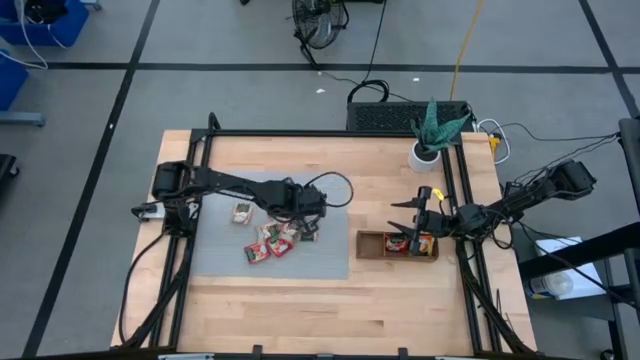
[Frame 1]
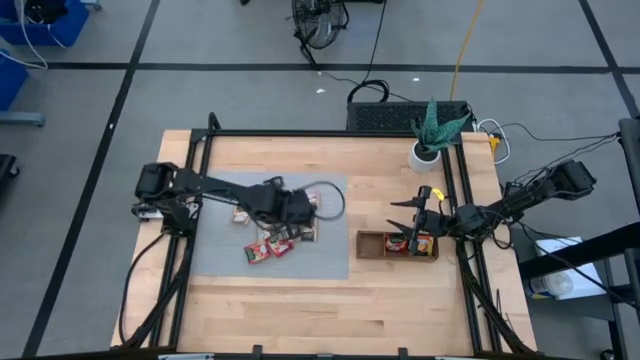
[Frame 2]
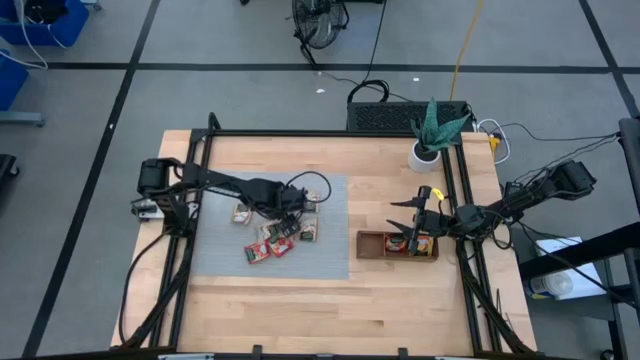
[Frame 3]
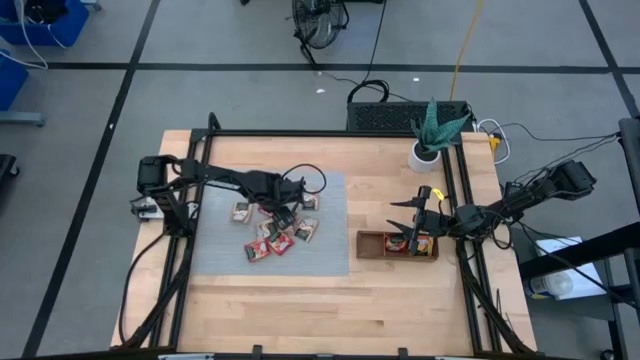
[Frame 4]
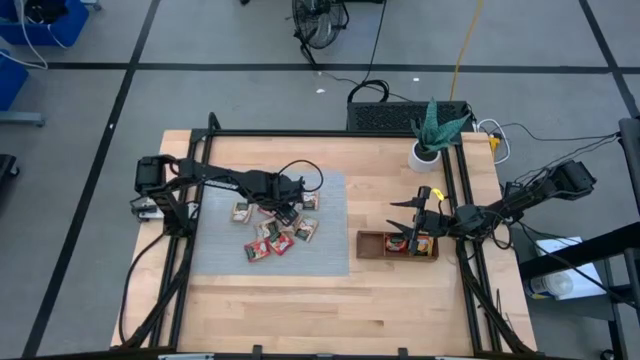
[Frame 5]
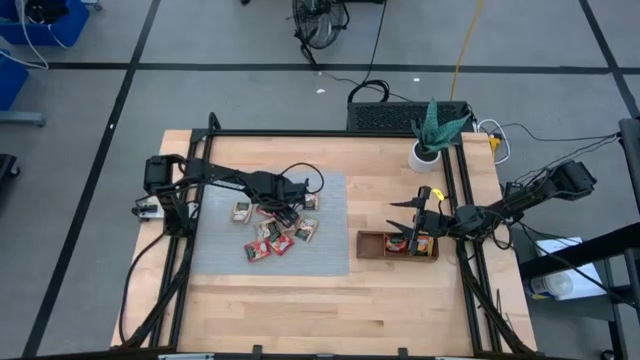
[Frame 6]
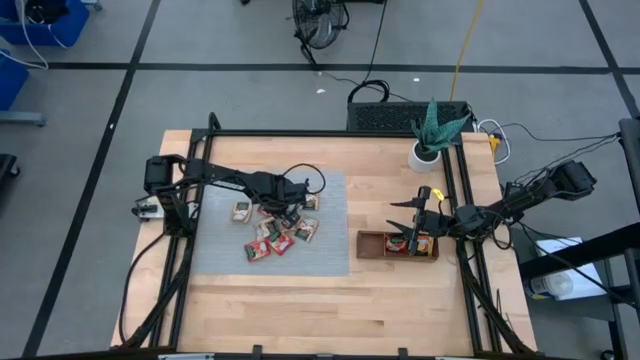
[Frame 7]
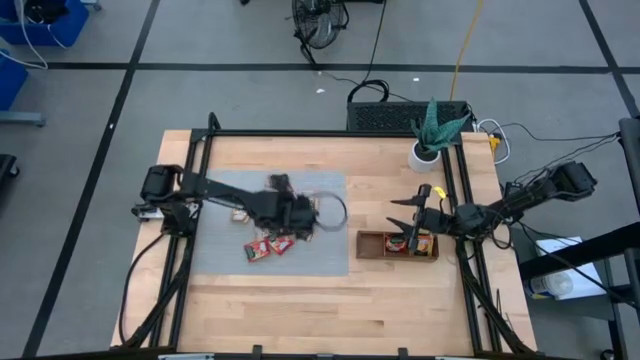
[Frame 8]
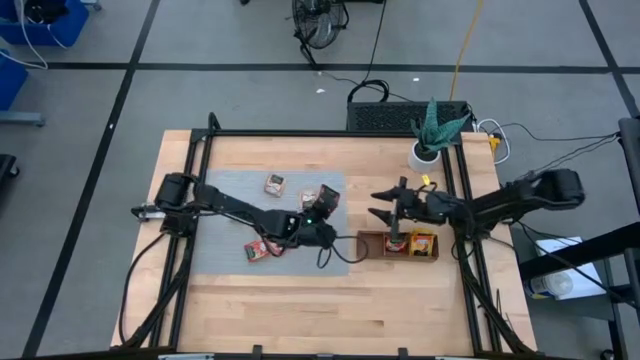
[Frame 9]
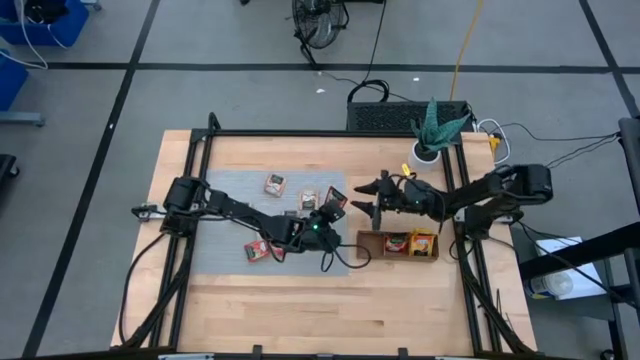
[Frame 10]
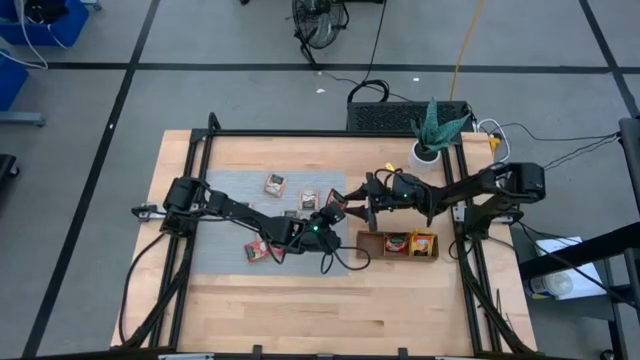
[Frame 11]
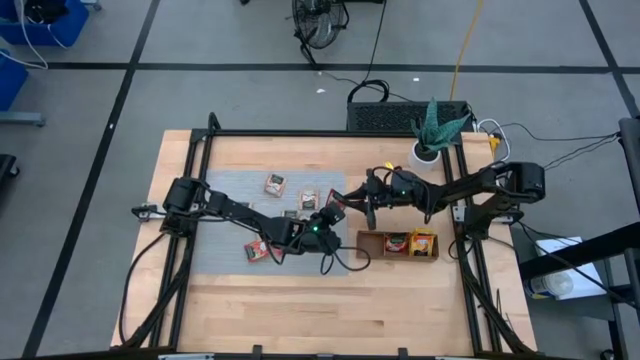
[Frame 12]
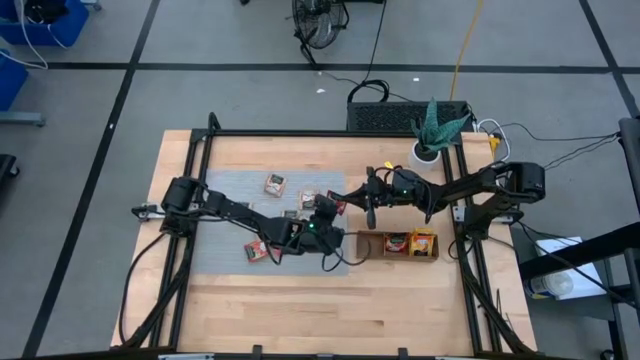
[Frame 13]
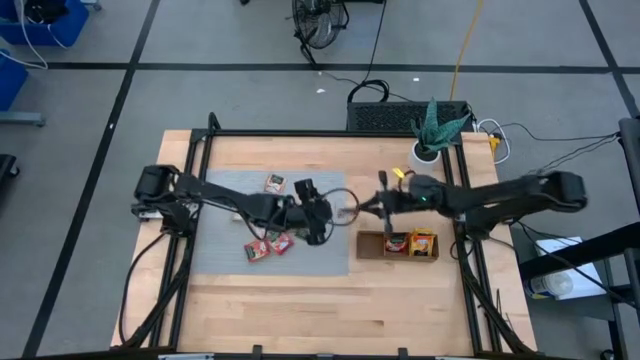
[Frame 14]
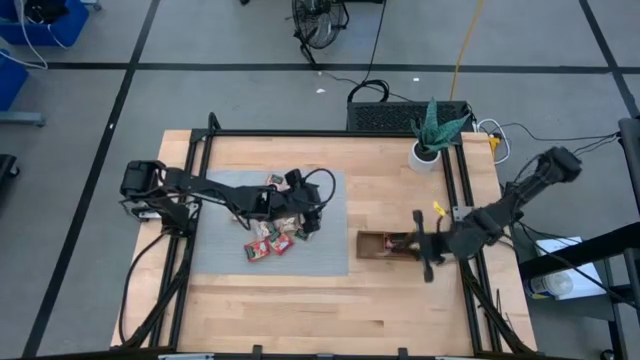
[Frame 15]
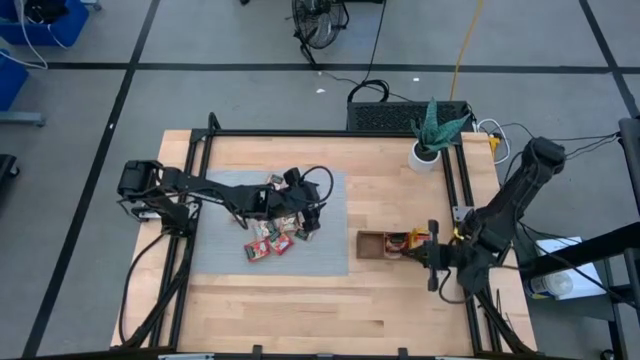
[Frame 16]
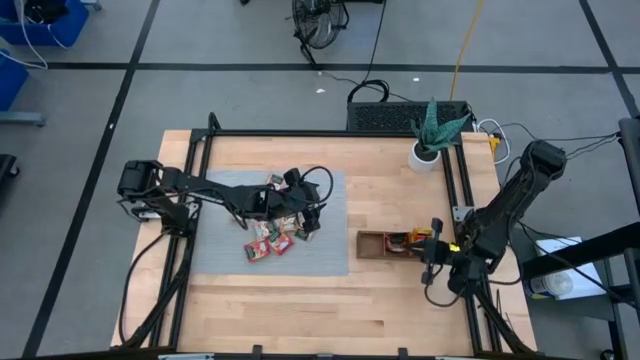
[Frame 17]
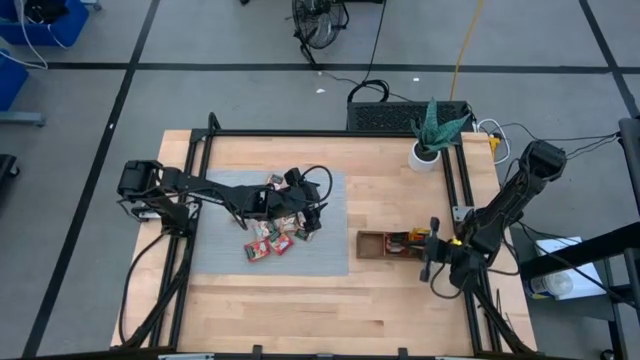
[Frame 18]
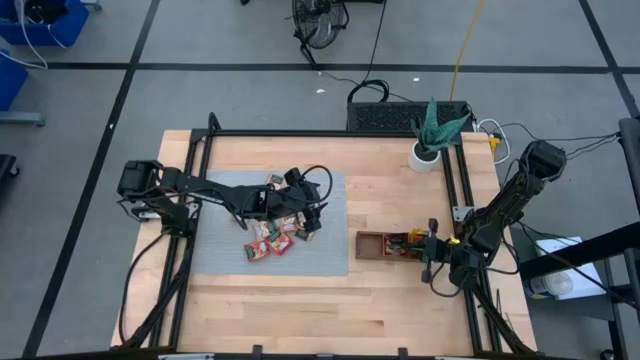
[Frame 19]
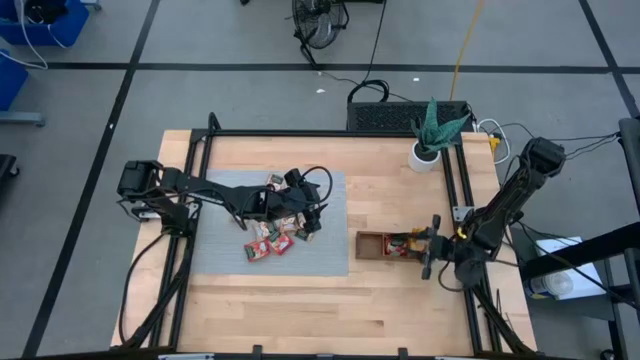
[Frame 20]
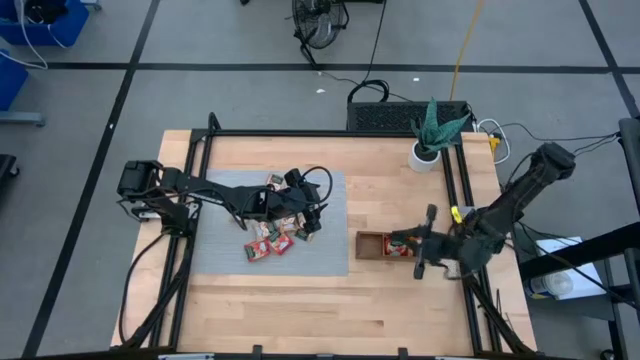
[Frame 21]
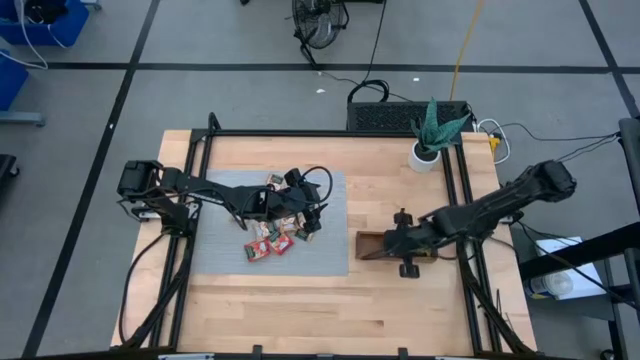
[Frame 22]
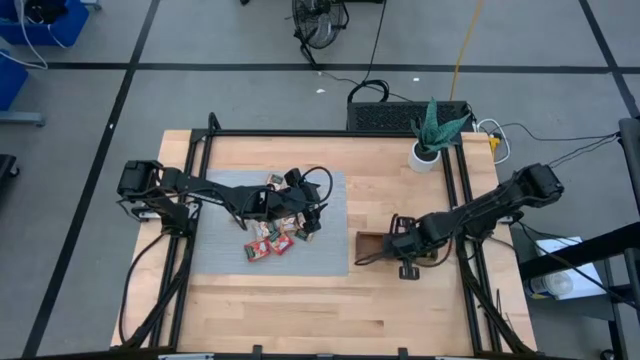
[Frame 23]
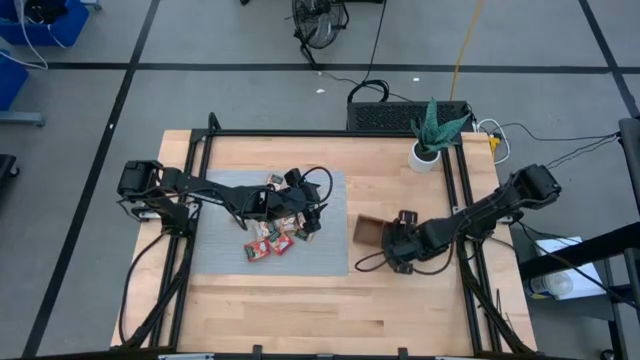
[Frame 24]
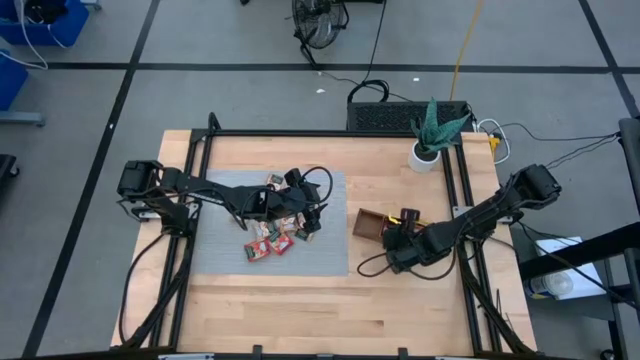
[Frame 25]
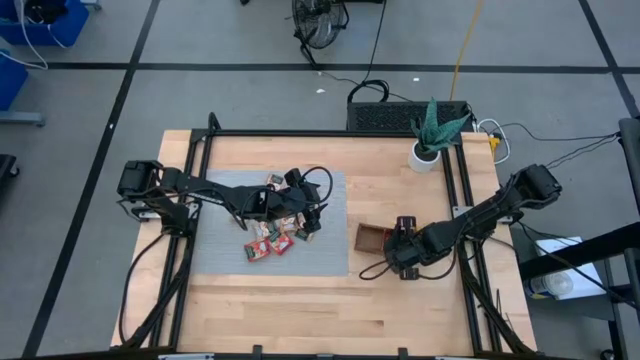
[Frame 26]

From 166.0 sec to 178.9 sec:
Task: Pick & Place Tea
Put the red tea bag into the middle section of the wooden organizer

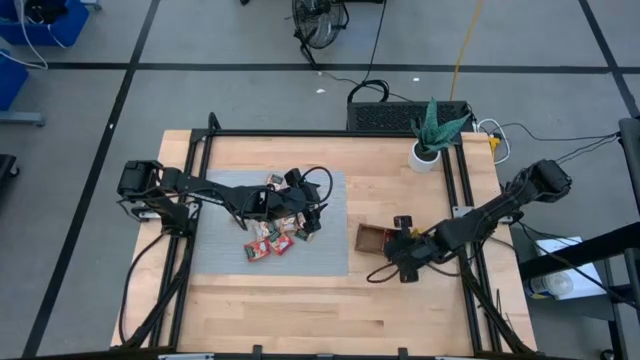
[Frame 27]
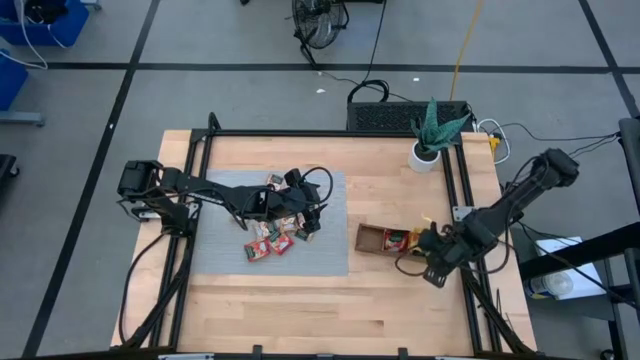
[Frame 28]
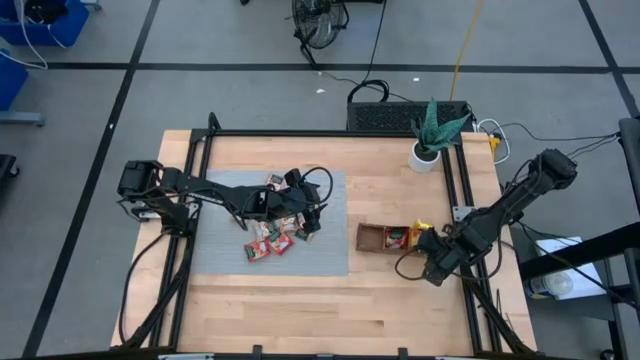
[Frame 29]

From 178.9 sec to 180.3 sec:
Adjust the wooden organizer on the table

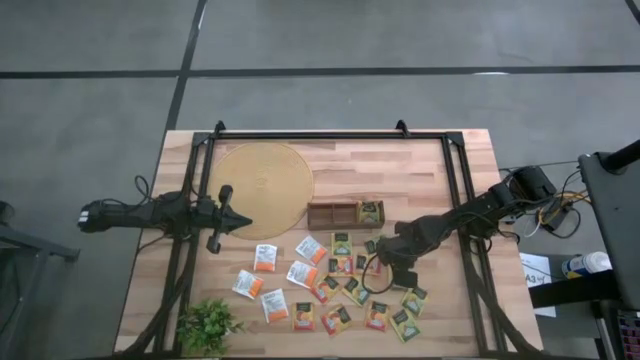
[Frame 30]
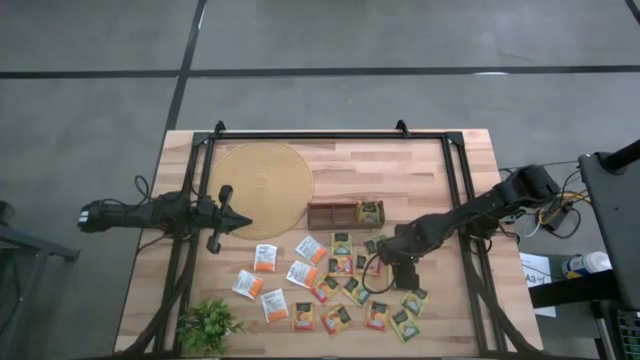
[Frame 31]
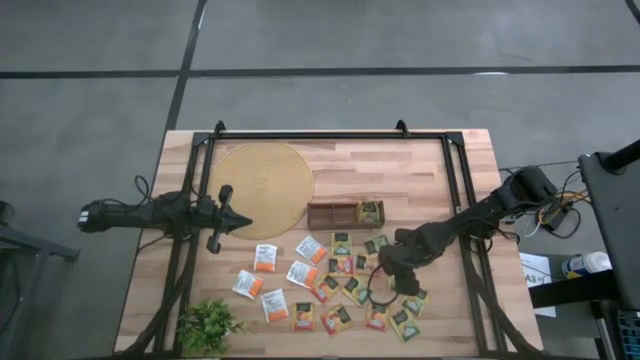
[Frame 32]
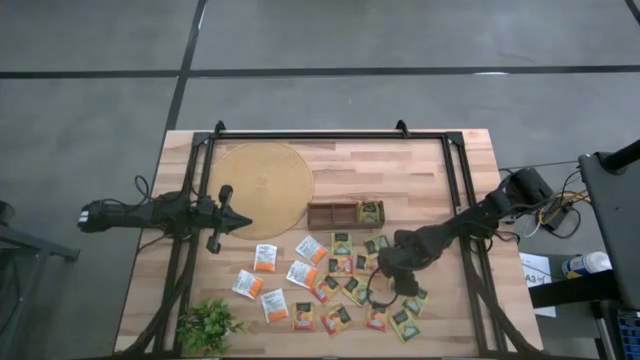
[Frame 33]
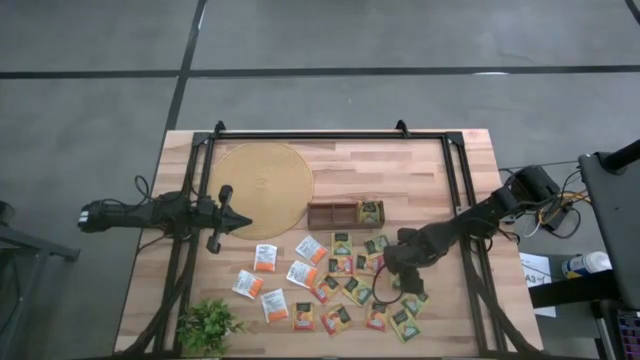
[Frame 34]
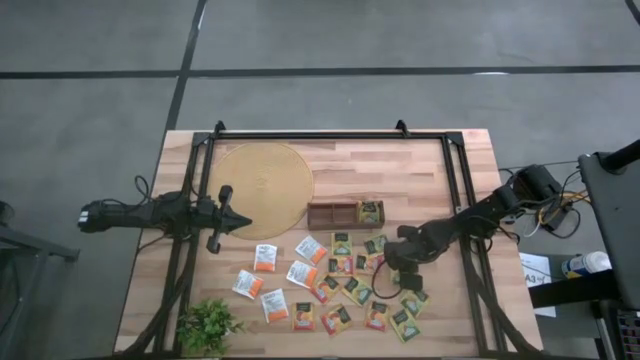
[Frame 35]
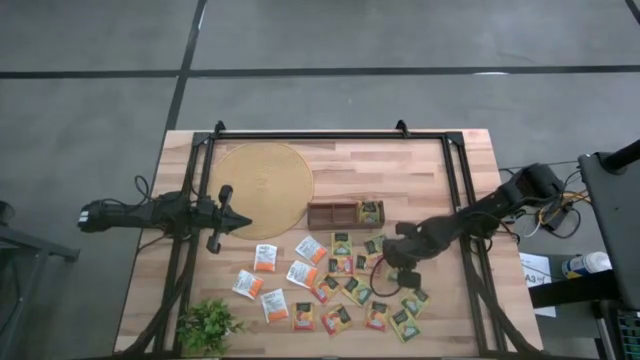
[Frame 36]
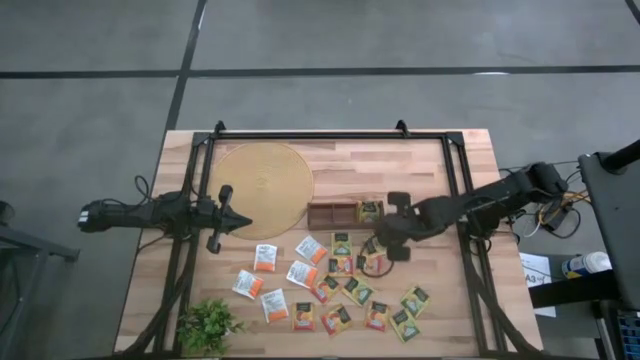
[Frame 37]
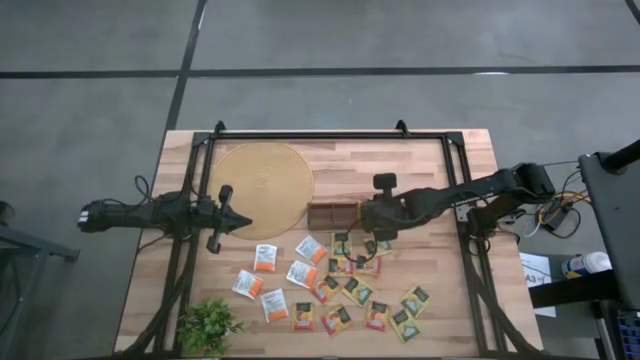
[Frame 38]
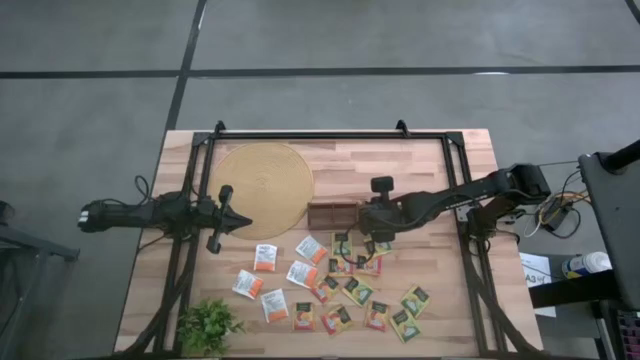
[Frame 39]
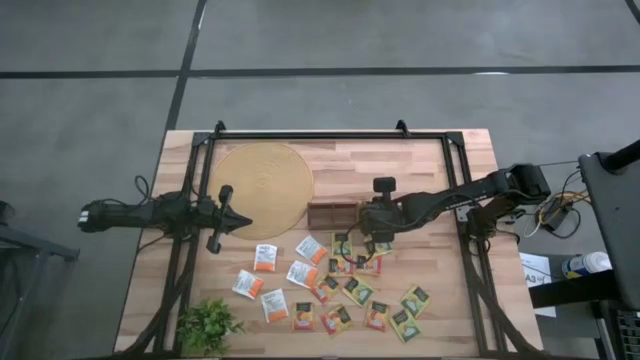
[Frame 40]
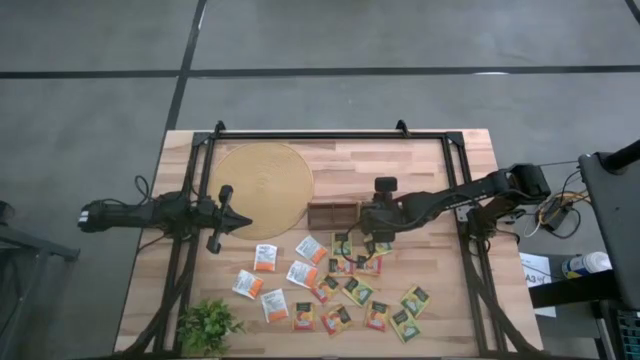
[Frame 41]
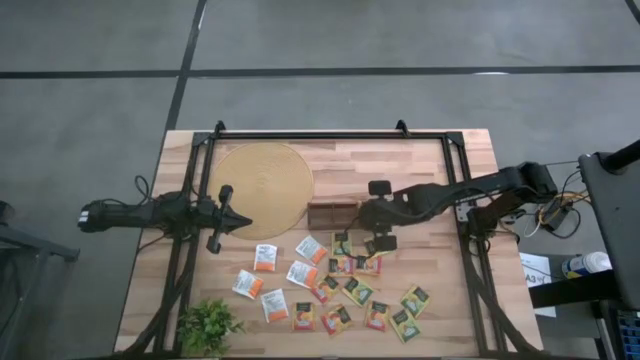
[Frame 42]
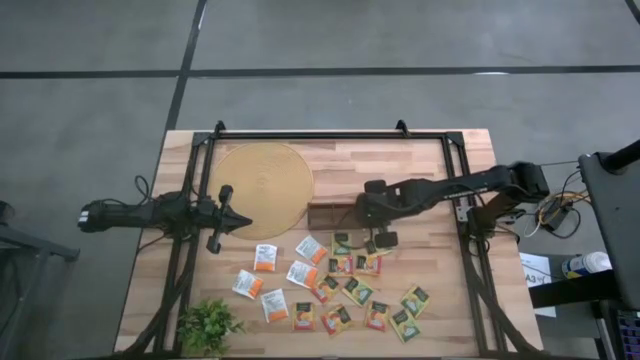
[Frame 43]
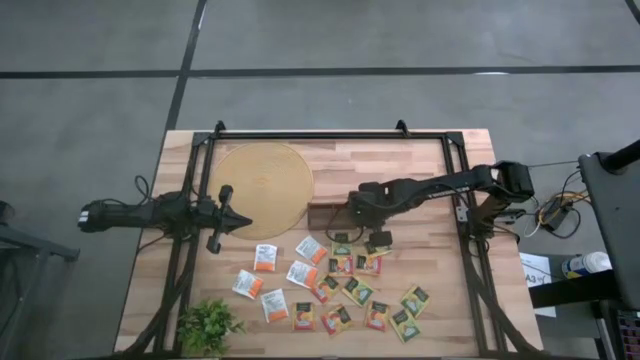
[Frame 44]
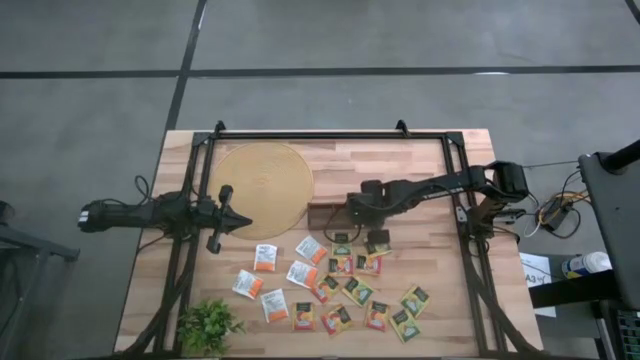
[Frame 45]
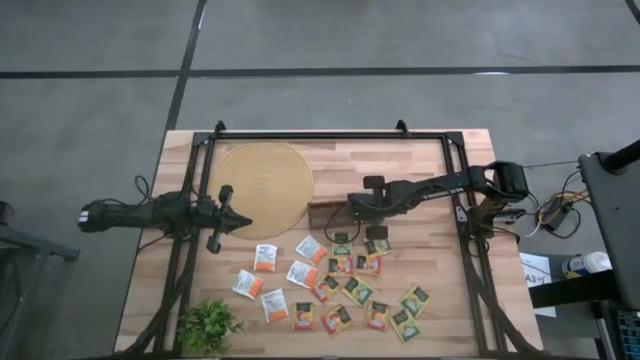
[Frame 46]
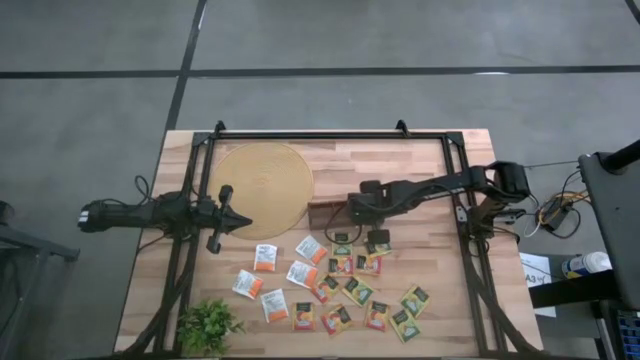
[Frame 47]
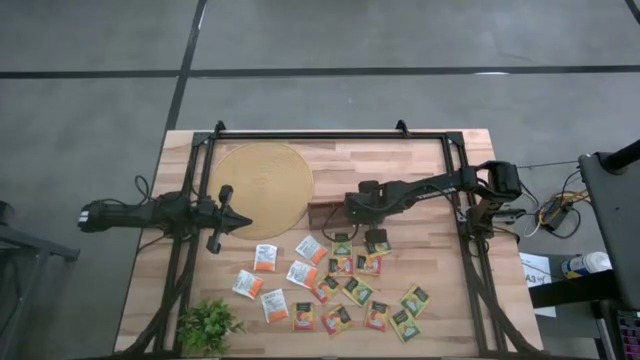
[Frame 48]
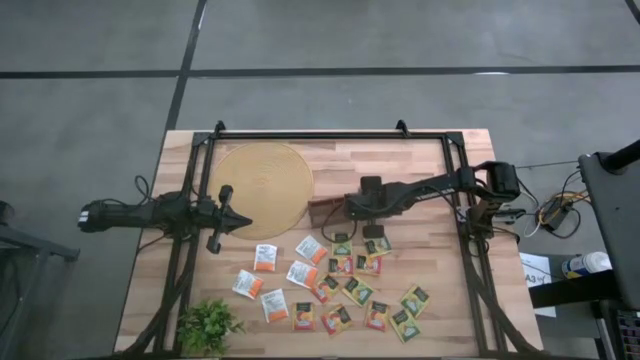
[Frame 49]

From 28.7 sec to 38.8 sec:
Task: Pick & Place Tea
Put the yellow tea bag into the right section of the wooden organizer
